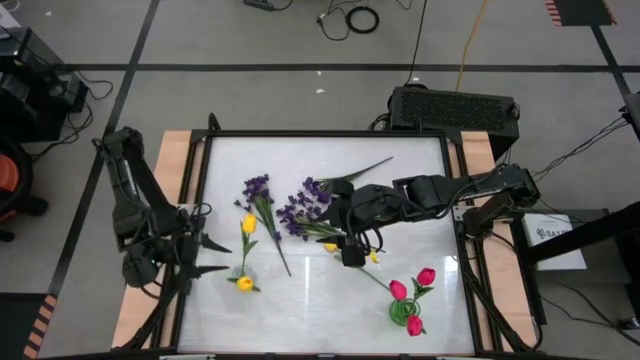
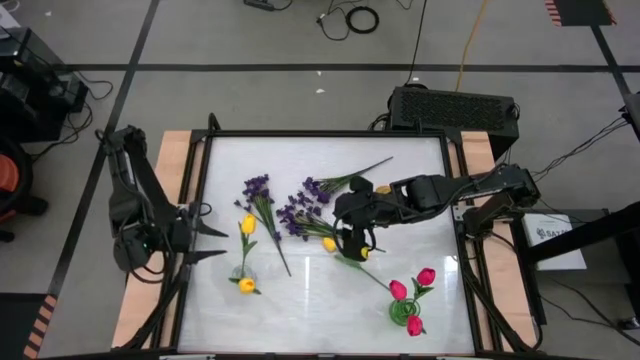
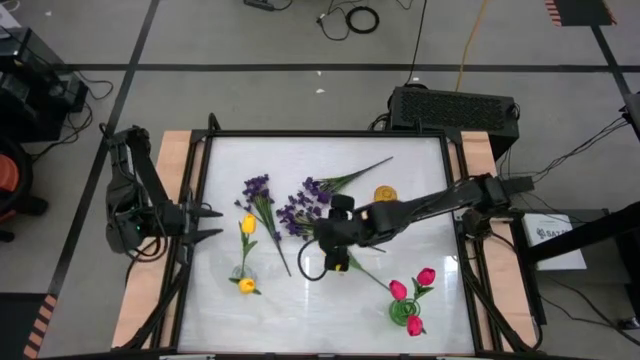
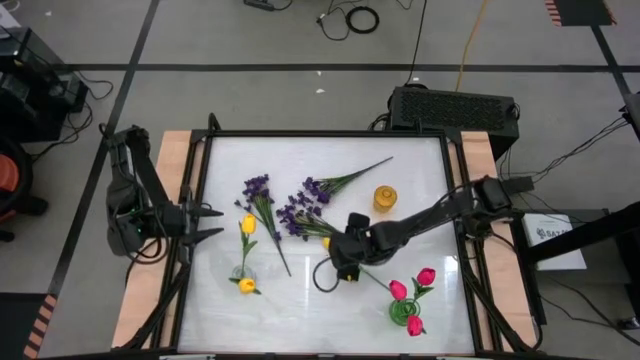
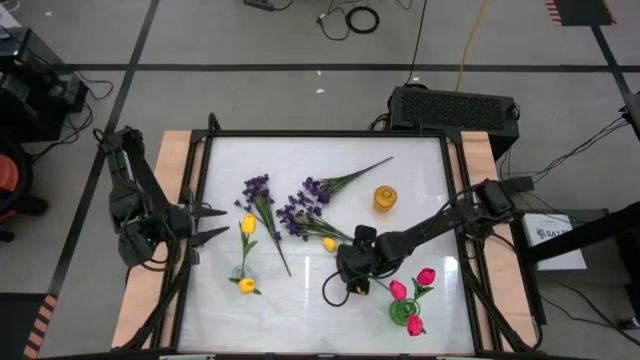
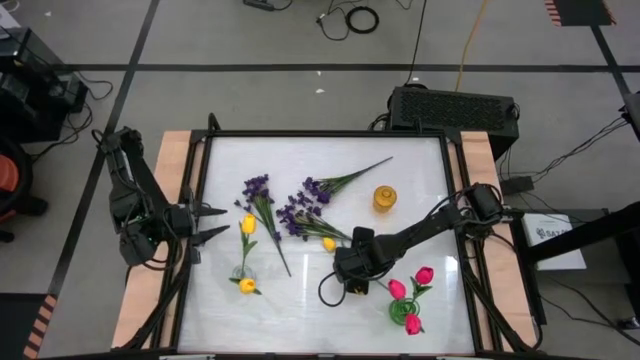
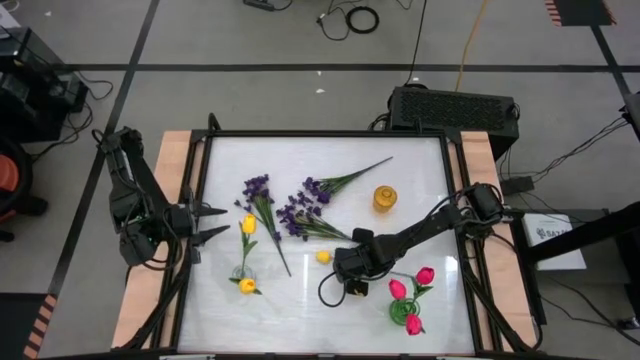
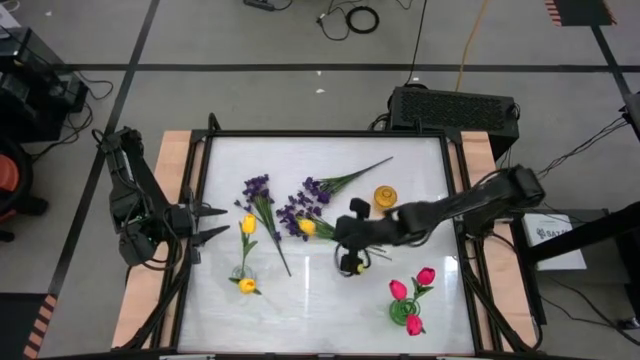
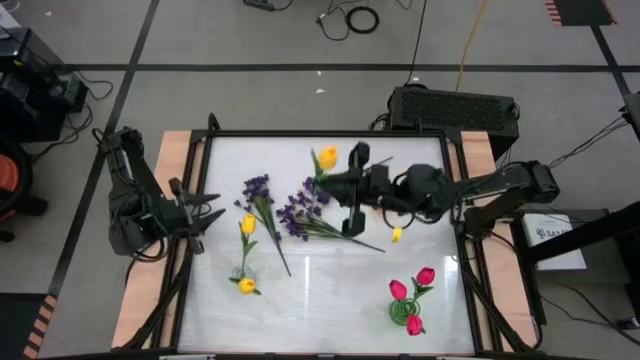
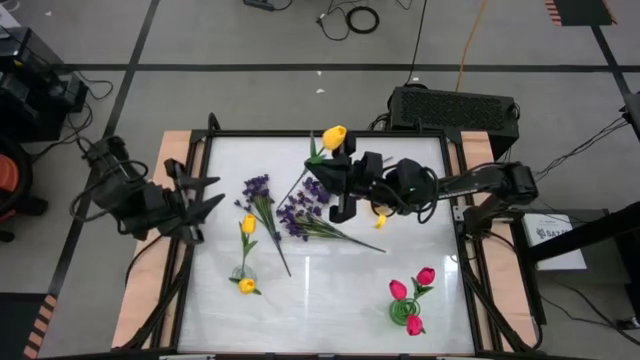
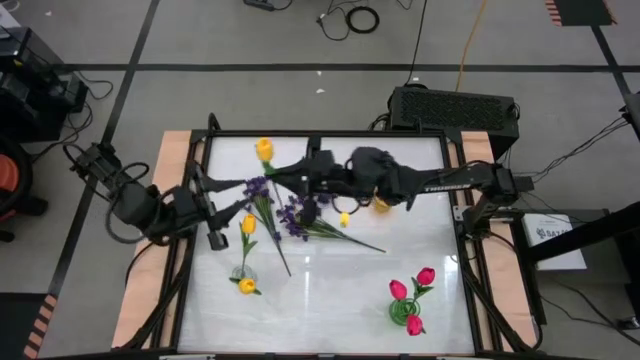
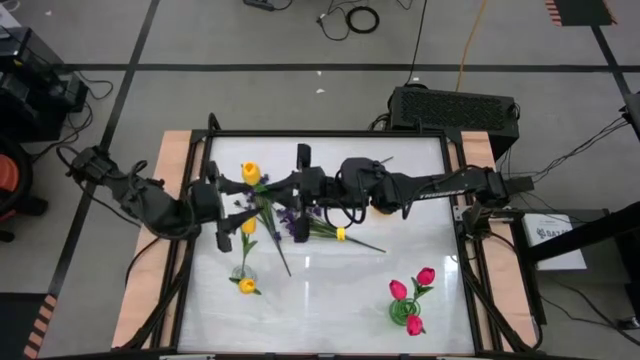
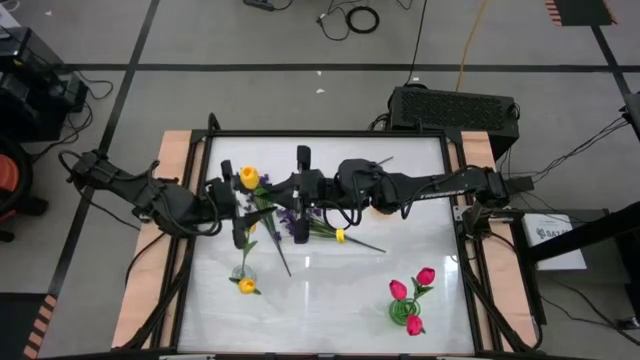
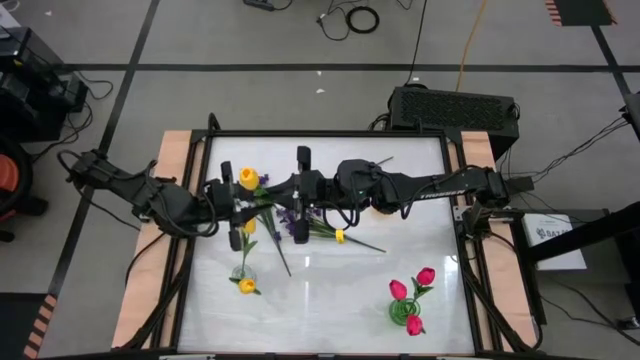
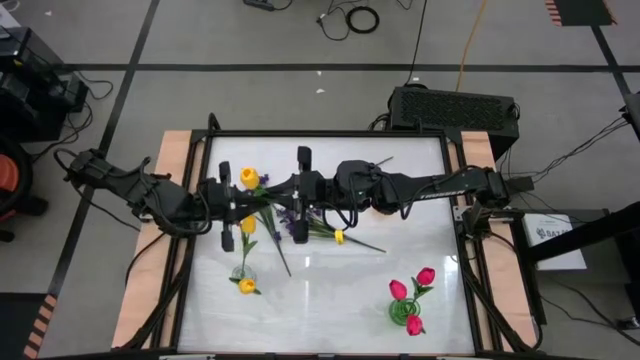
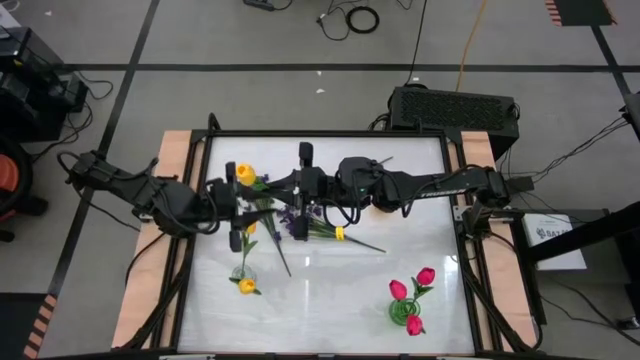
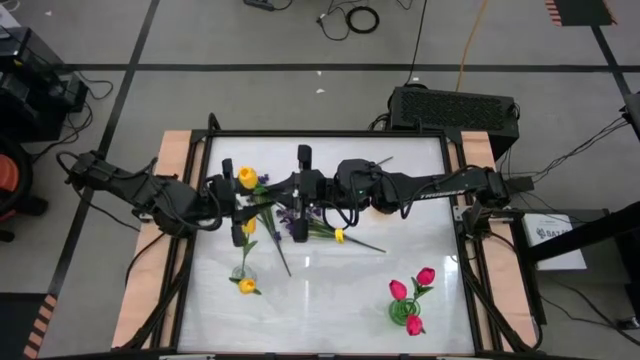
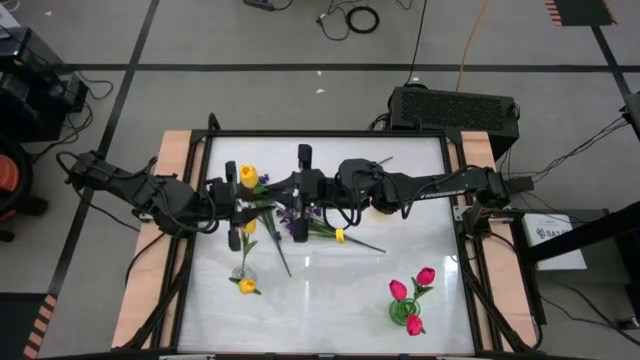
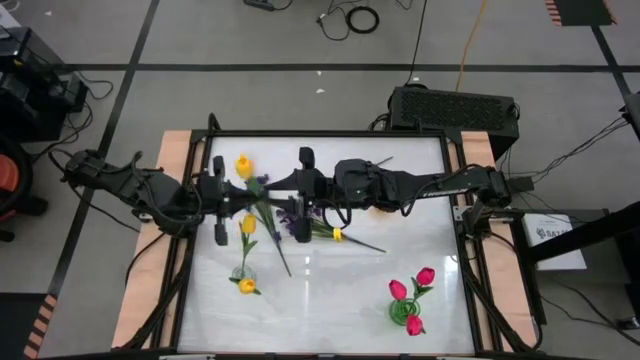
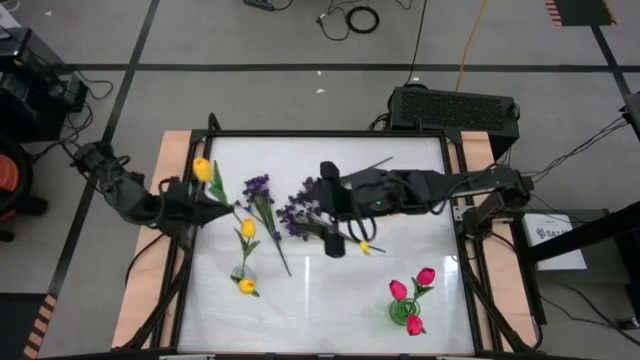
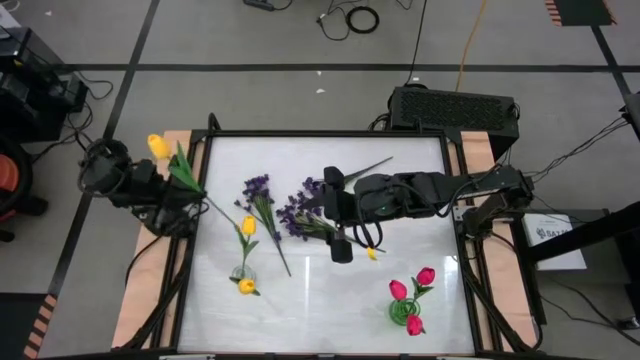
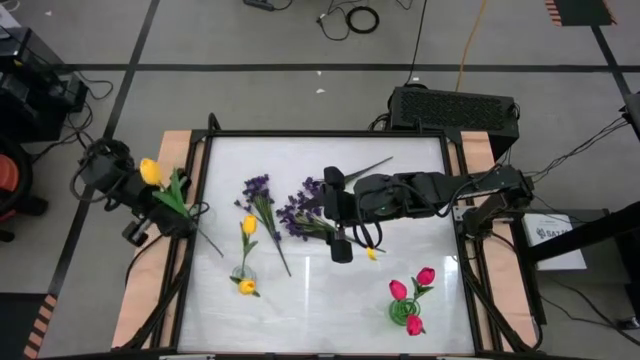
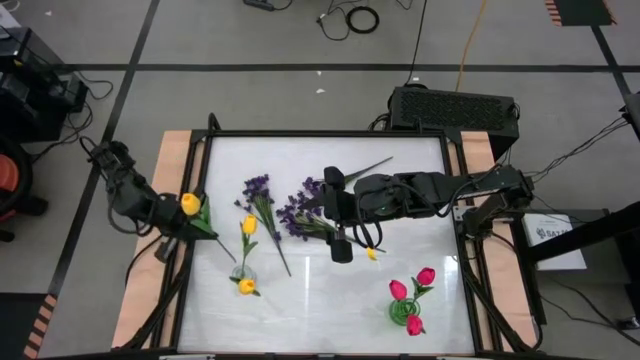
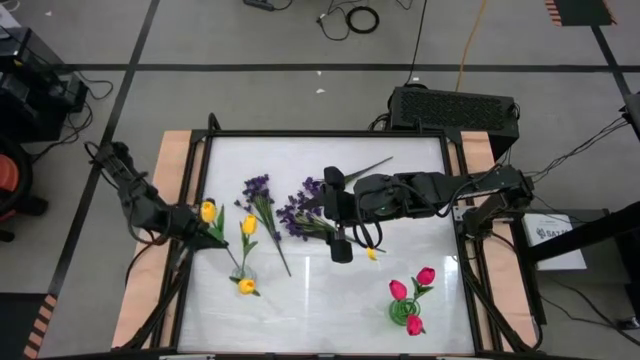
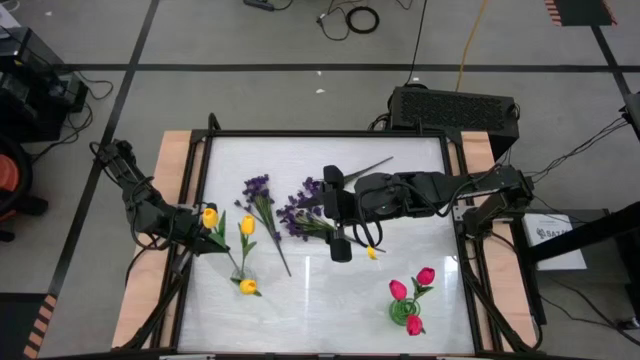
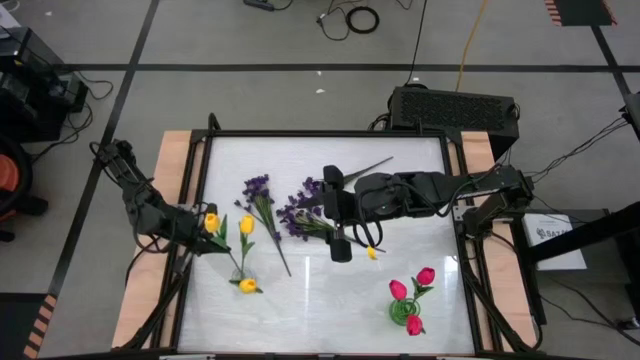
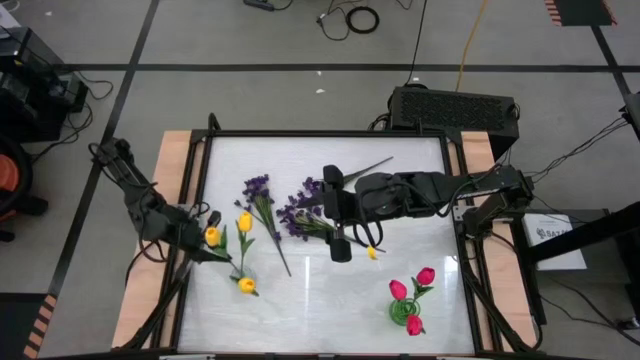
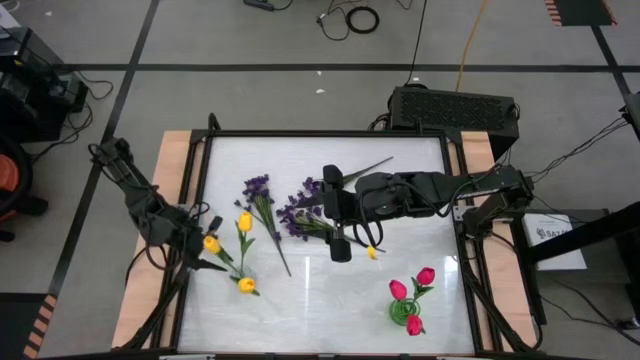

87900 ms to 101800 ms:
Task: Sort flowers into vase by color
Put the yellow flower into the transparent vase

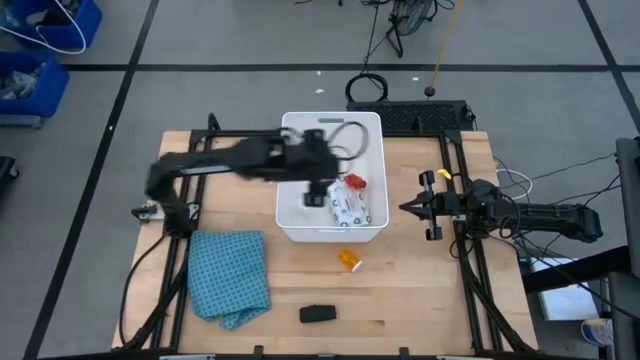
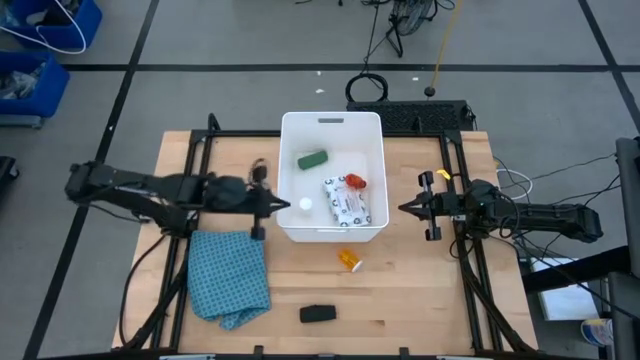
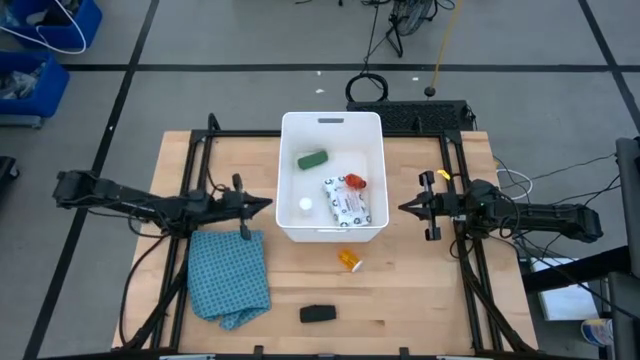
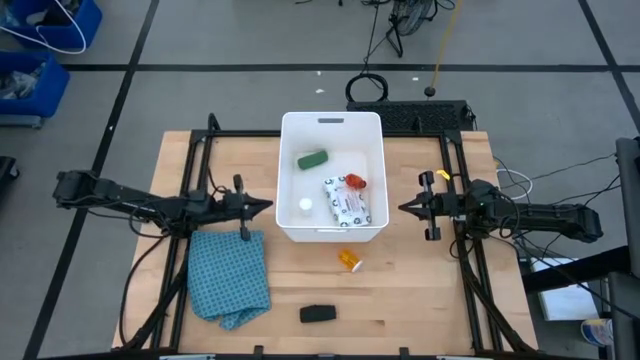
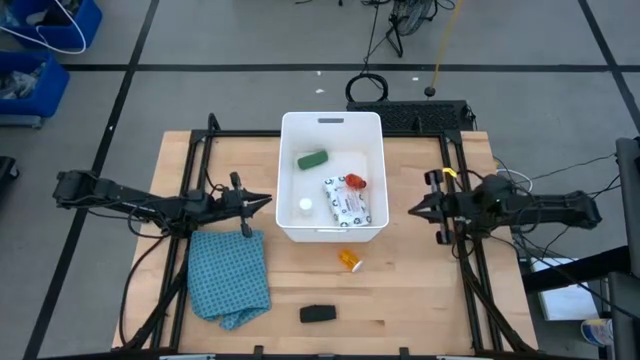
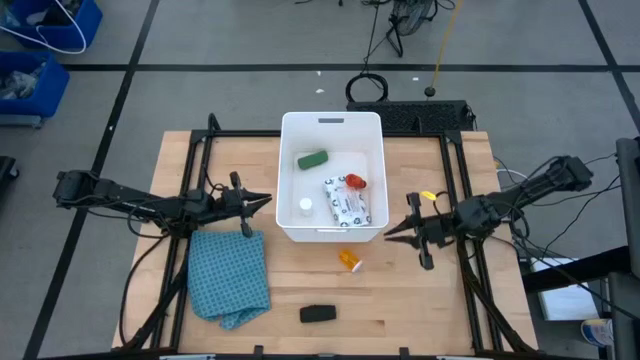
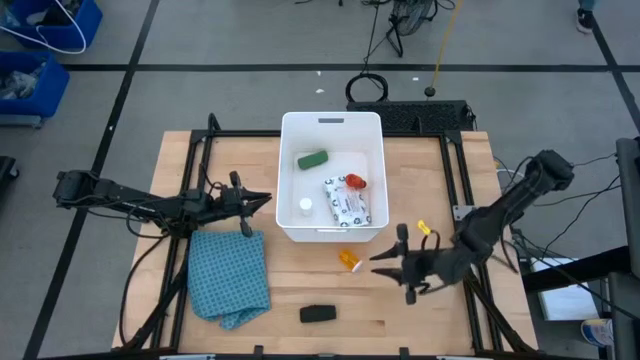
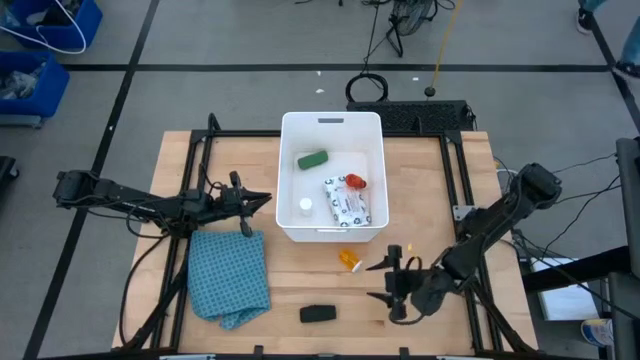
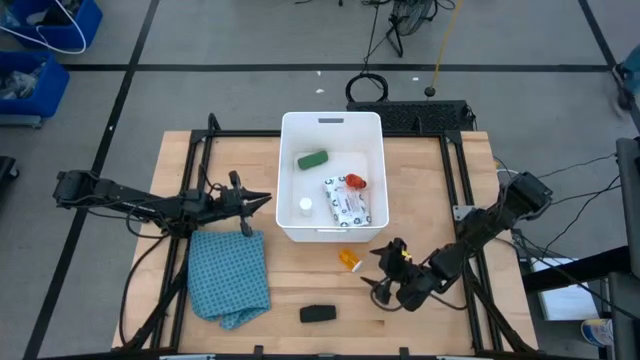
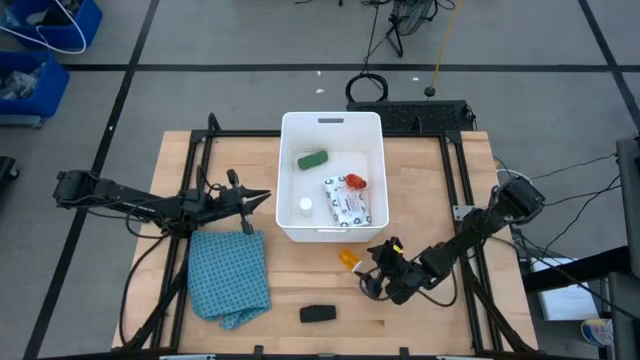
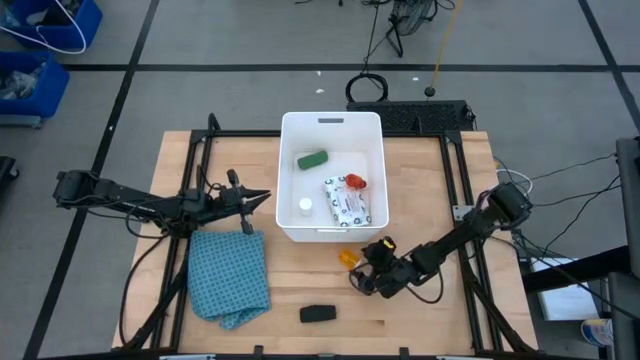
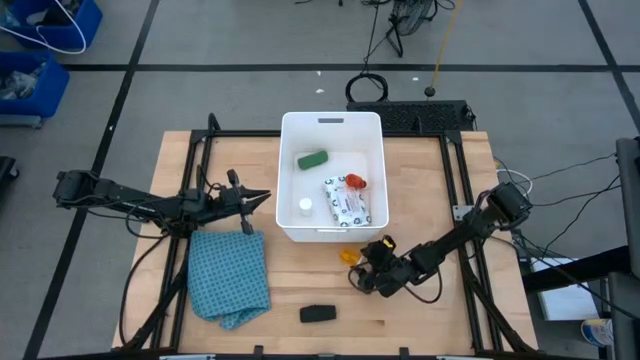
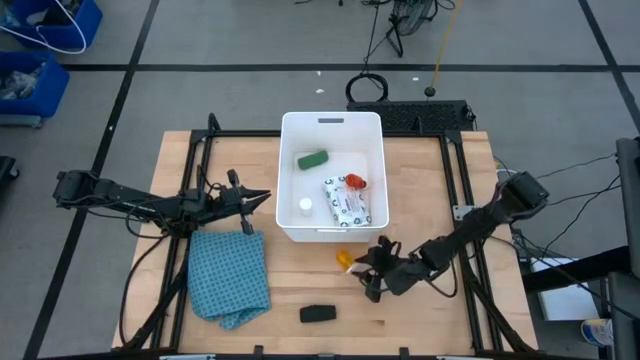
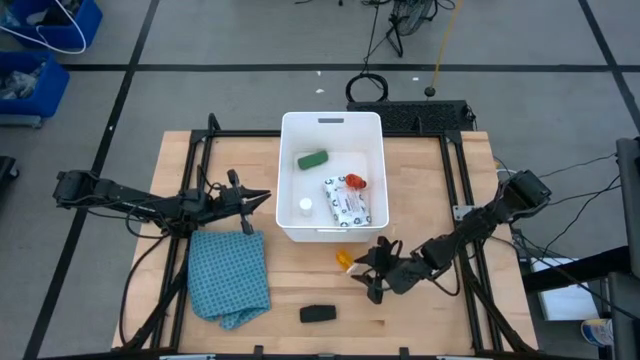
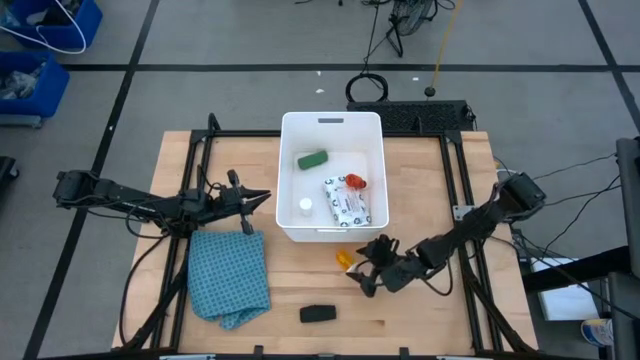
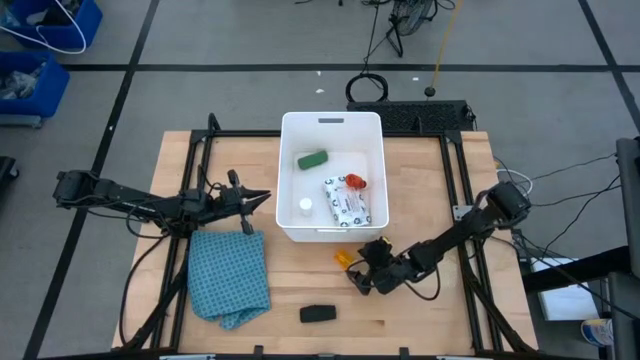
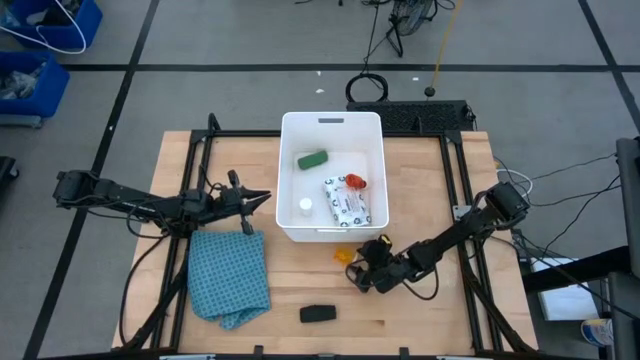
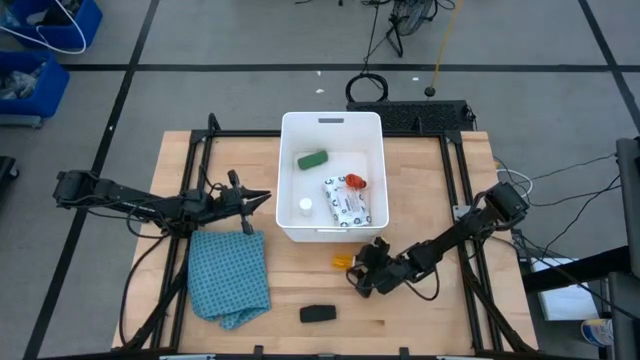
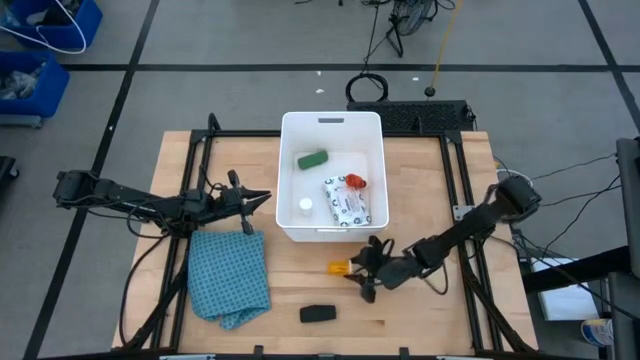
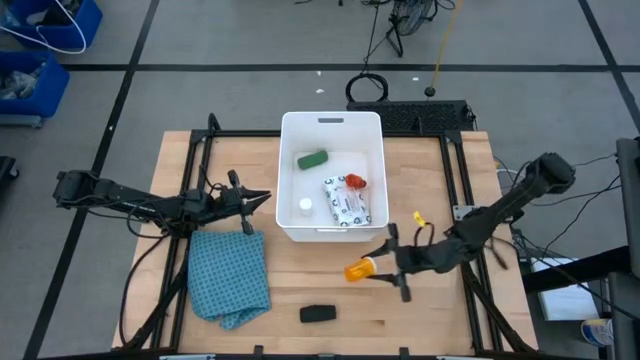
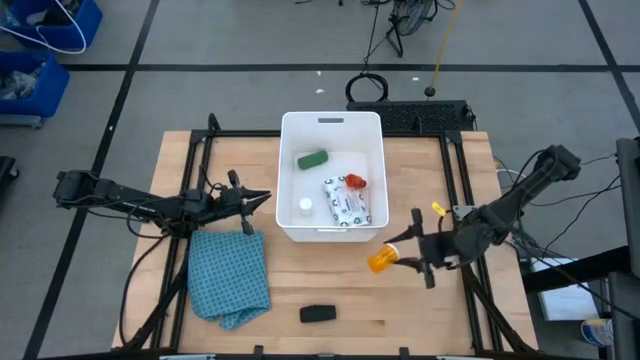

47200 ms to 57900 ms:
Task: Pick & place medical supplies in basket/bin
Put the orange pill bottle into the white bin
